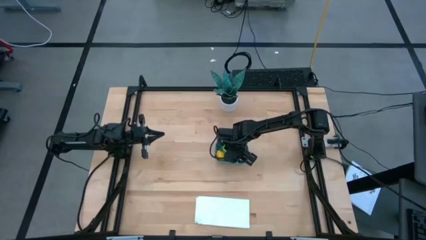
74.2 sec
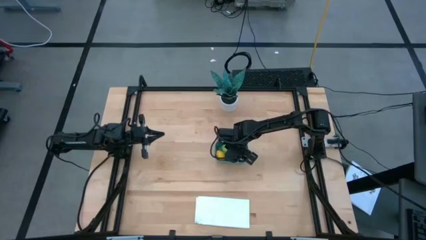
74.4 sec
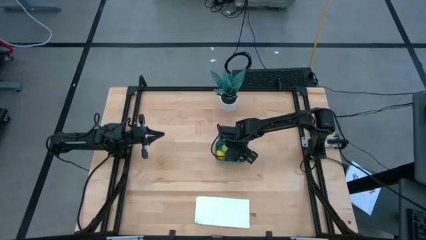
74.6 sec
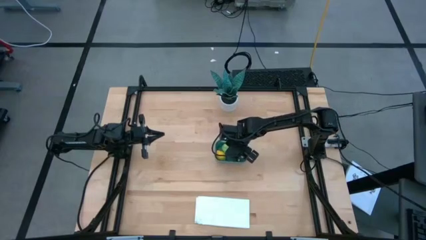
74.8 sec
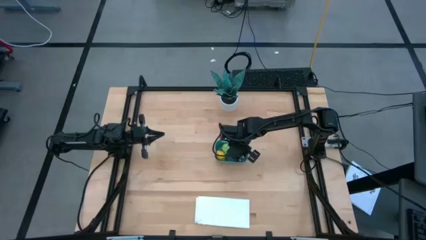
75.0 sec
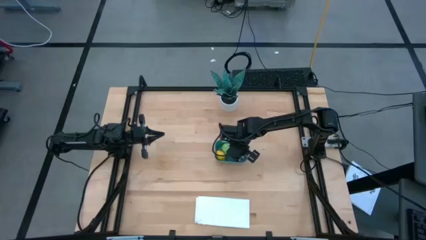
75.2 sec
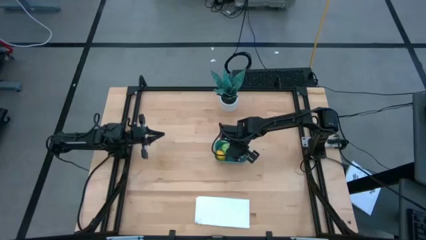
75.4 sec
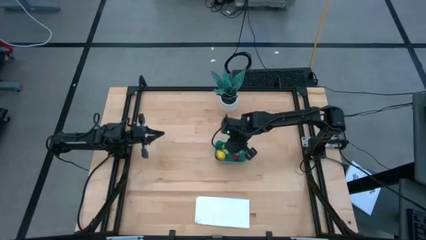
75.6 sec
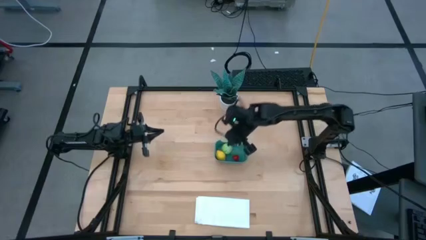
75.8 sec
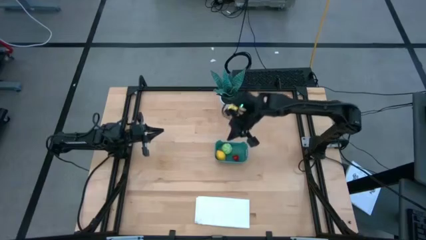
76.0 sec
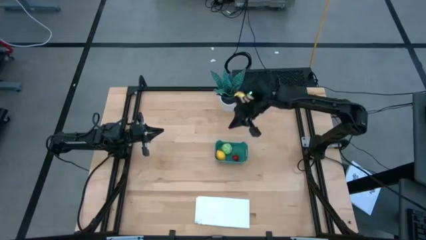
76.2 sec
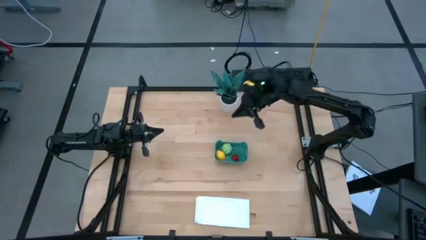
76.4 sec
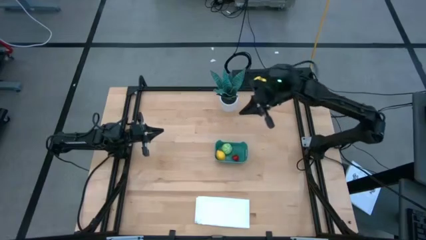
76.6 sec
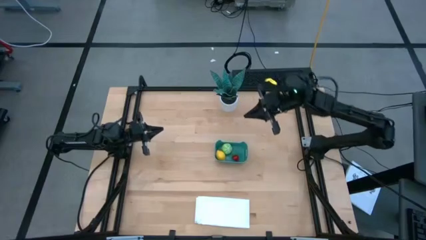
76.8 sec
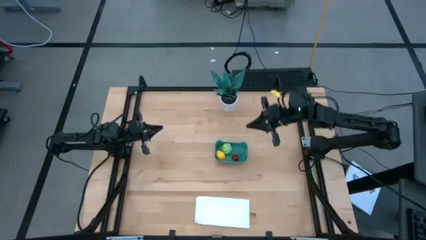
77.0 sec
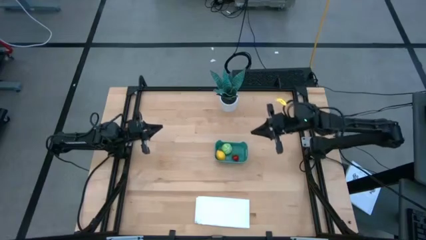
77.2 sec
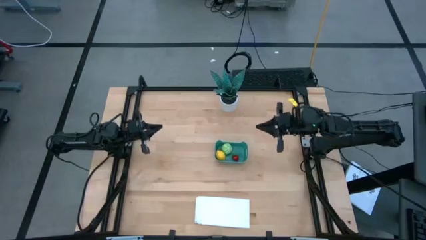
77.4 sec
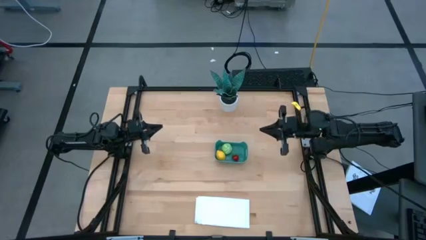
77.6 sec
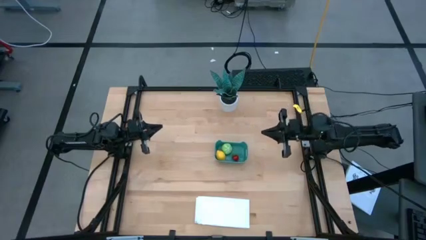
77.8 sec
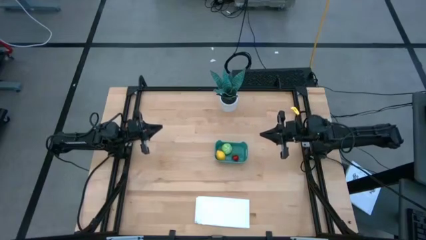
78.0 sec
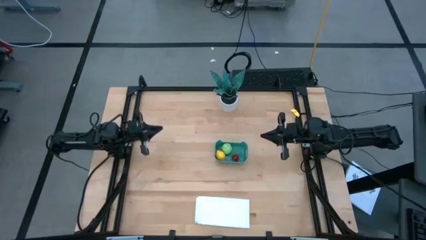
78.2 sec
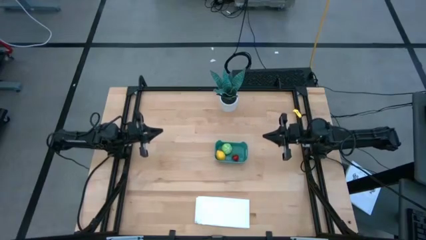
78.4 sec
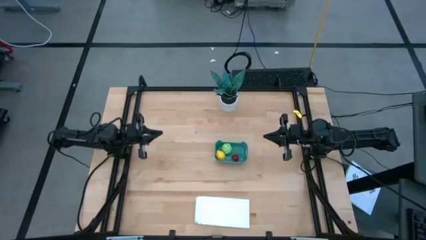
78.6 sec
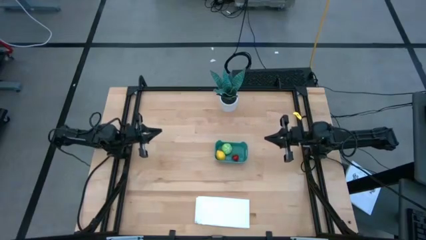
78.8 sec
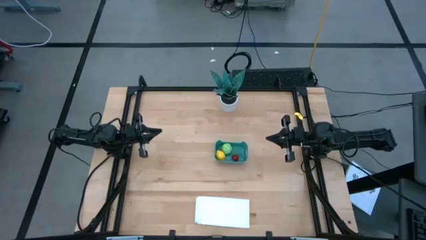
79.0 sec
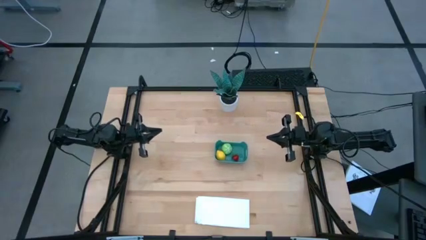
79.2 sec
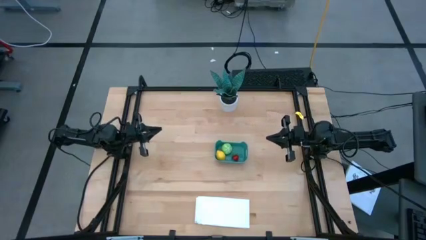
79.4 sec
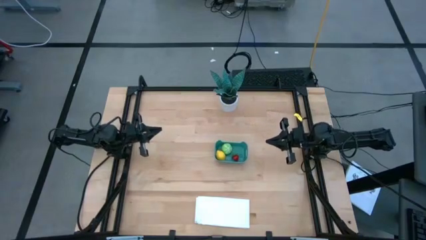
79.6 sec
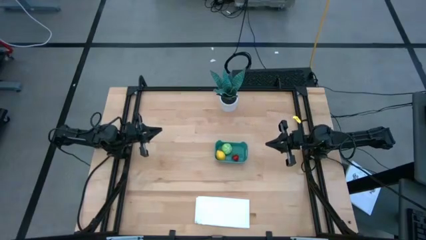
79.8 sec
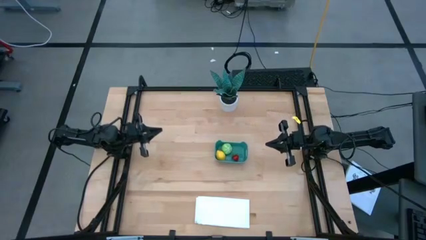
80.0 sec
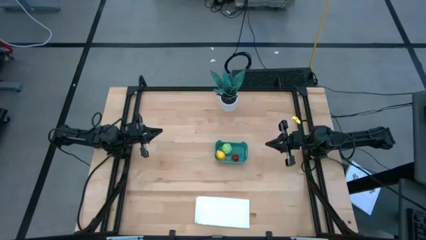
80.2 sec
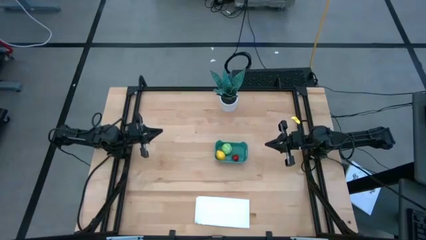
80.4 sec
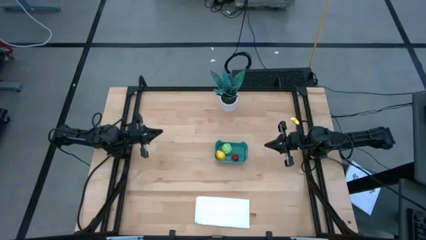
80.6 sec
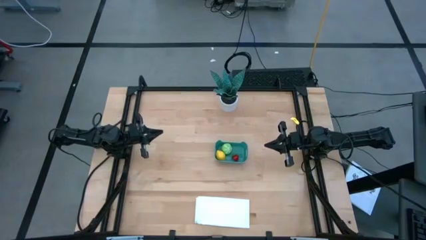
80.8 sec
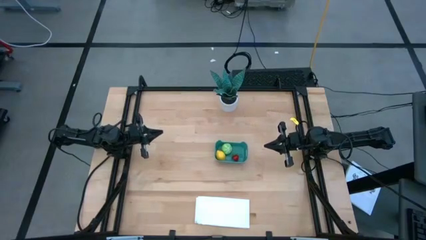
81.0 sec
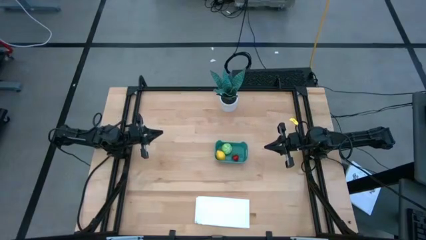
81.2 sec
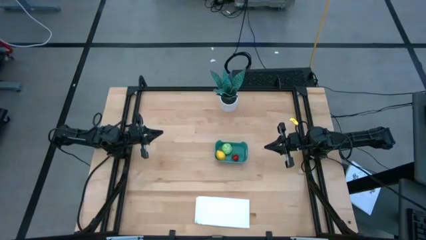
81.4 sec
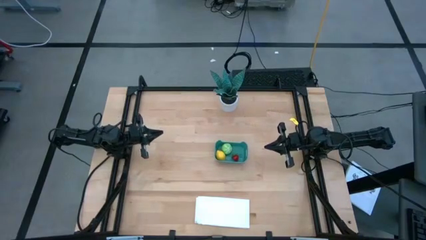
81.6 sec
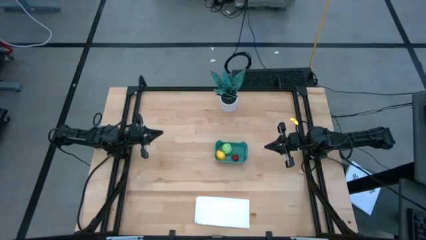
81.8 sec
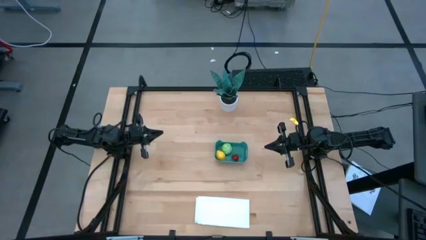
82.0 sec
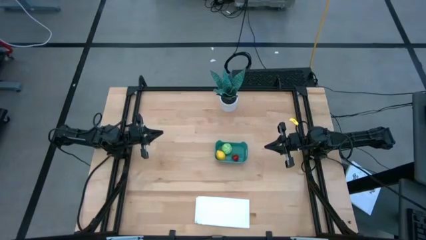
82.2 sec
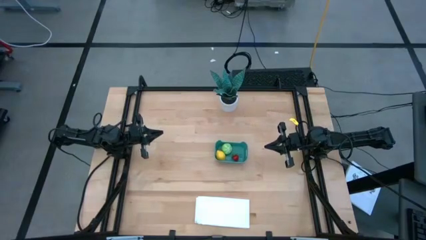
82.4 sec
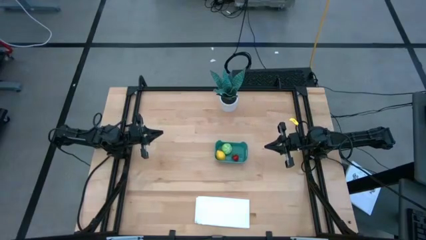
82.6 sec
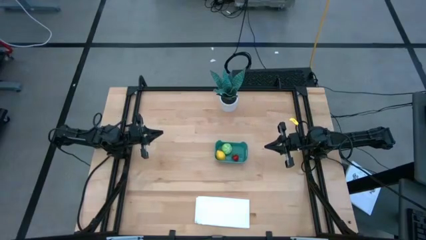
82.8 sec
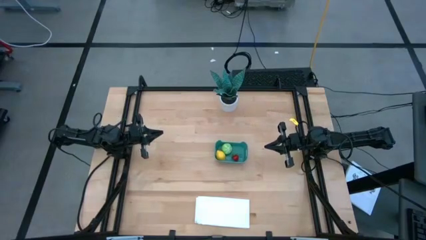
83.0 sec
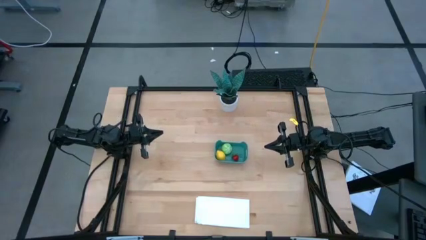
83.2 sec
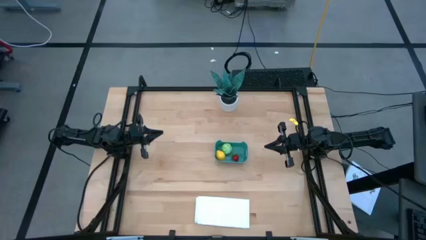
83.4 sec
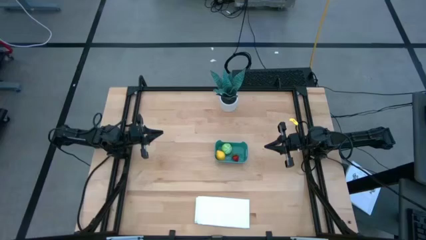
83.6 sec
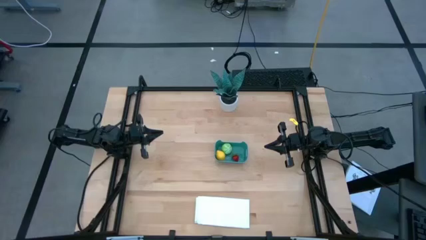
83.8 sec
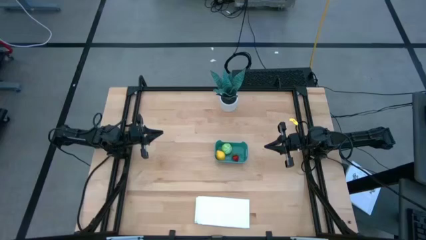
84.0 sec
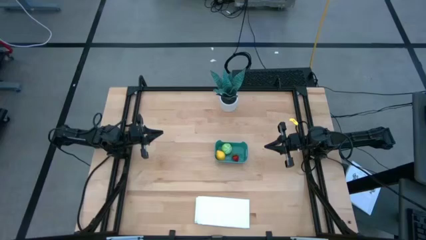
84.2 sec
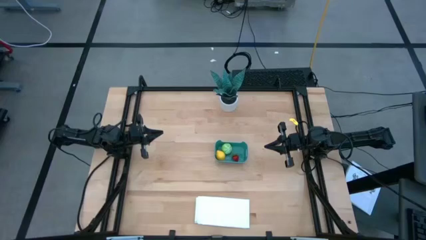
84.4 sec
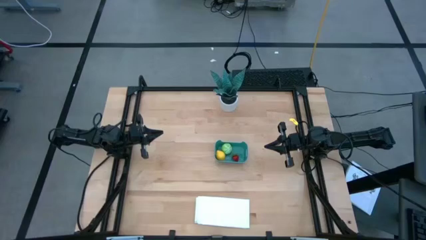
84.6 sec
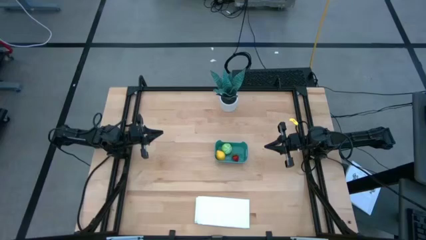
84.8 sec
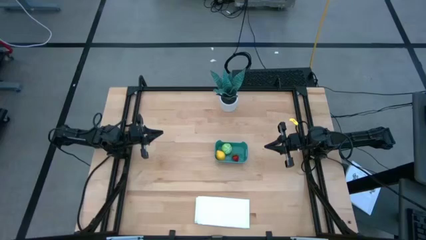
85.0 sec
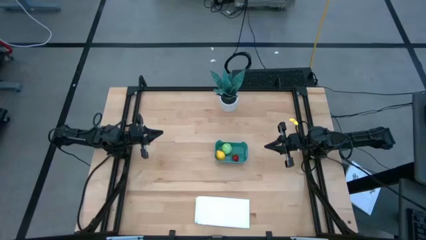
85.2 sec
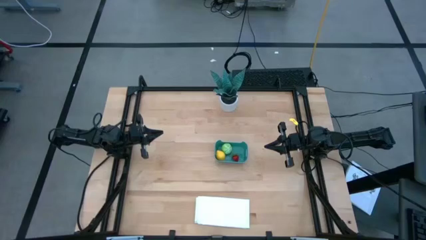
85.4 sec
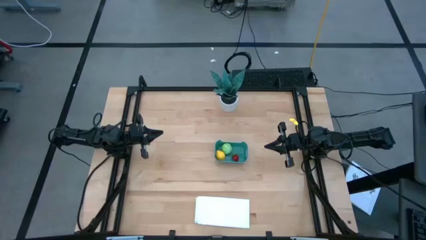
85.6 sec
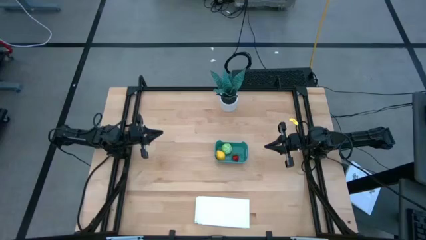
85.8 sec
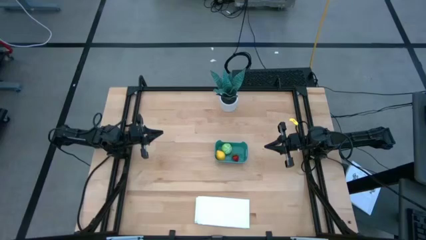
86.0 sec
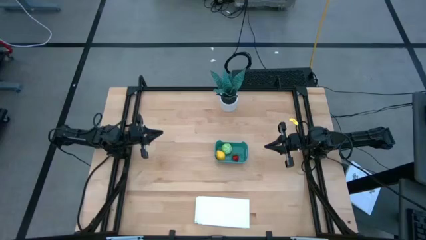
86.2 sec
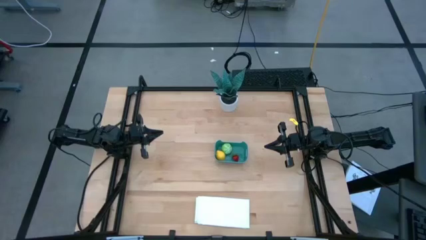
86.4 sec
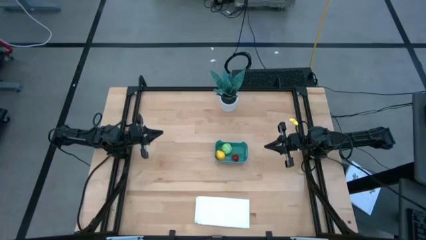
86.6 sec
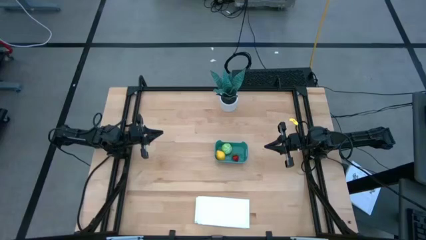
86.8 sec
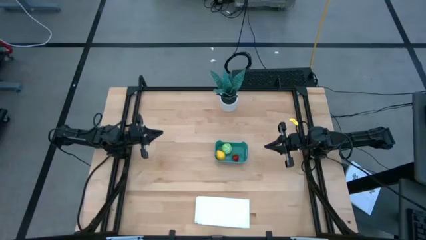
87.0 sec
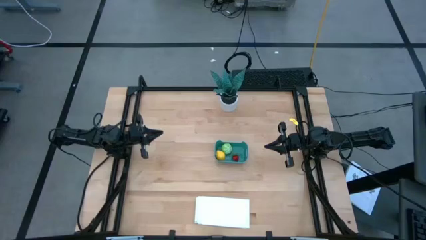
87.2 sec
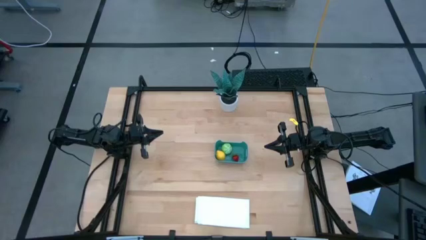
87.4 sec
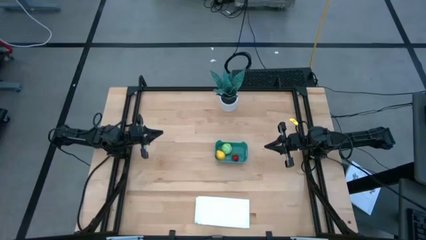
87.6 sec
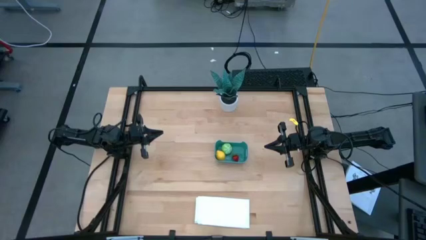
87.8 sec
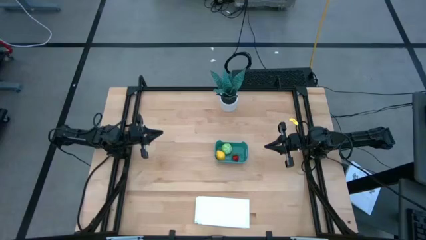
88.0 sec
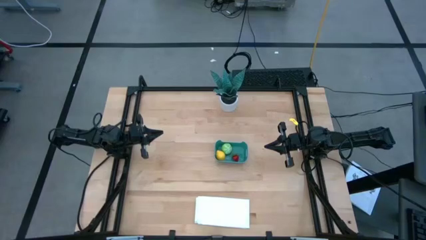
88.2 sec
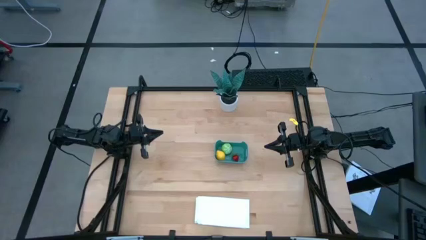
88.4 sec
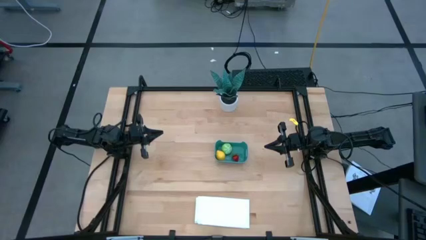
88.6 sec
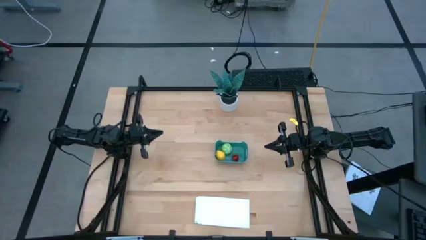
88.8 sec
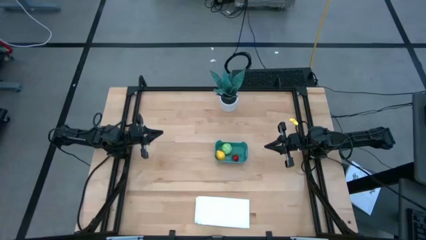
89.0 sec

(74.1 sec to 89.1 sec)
Task: Pick and placing Produce into tupperware
Return to Home Position
